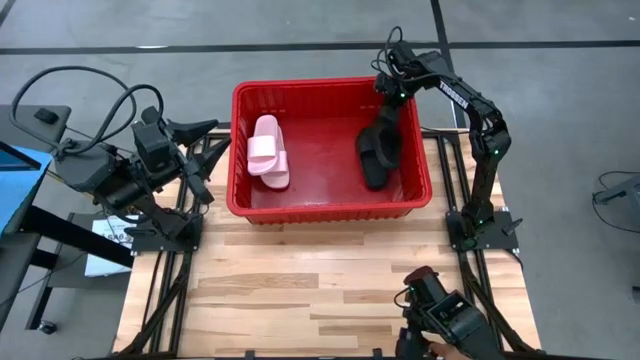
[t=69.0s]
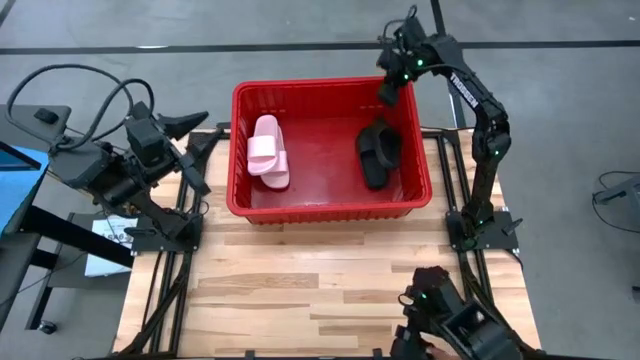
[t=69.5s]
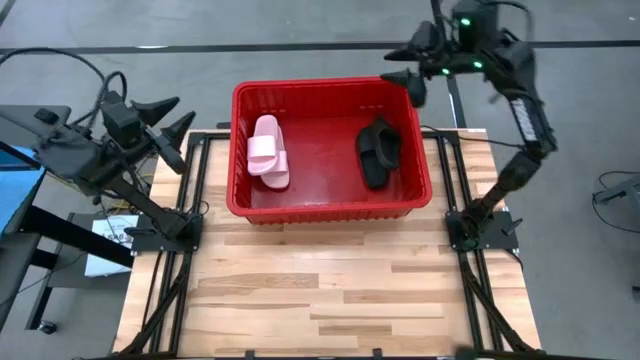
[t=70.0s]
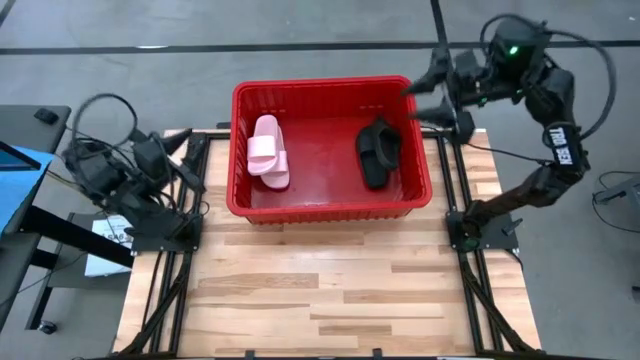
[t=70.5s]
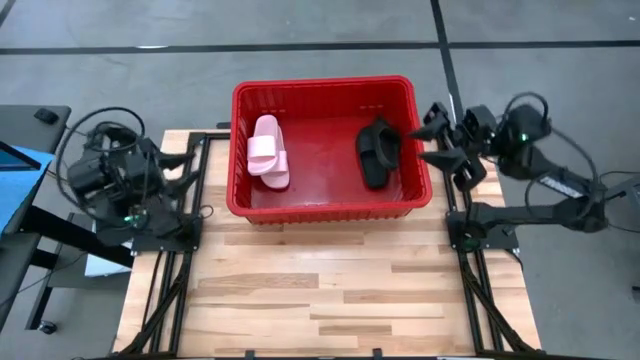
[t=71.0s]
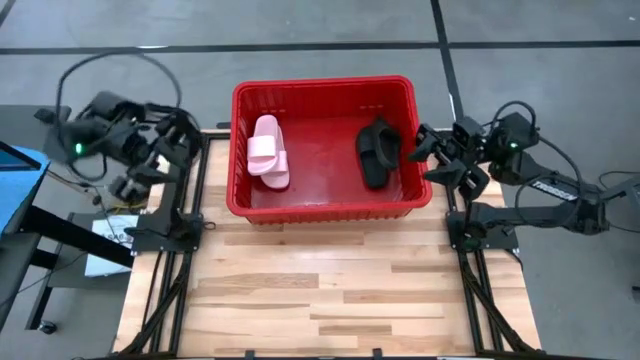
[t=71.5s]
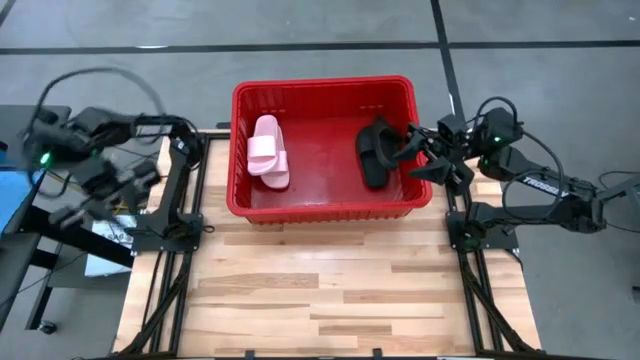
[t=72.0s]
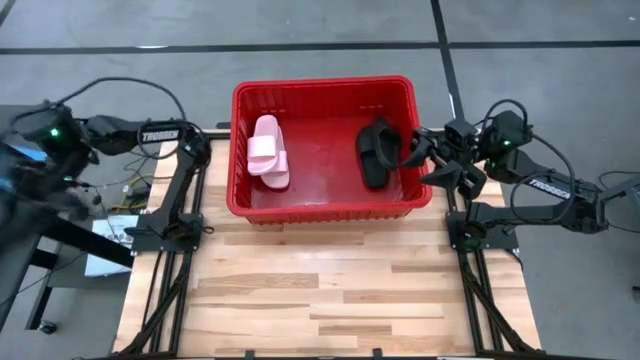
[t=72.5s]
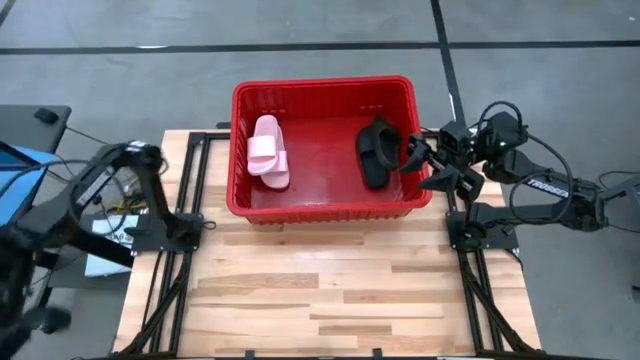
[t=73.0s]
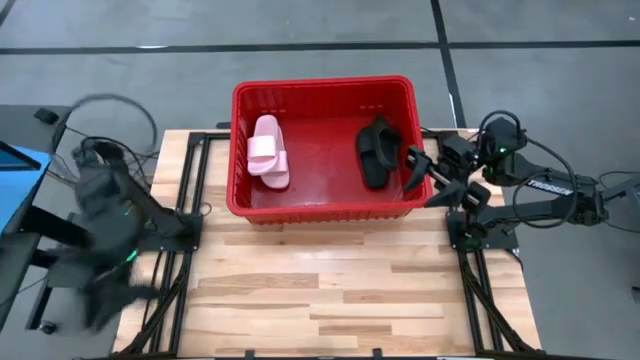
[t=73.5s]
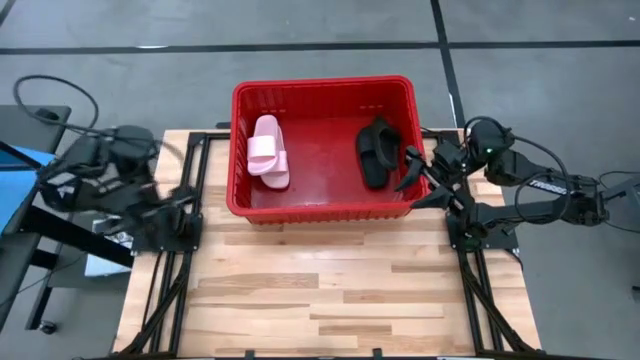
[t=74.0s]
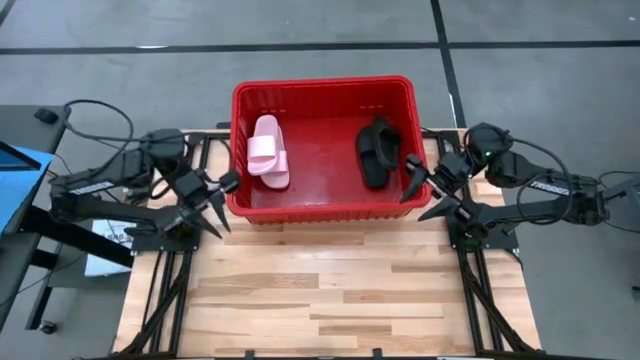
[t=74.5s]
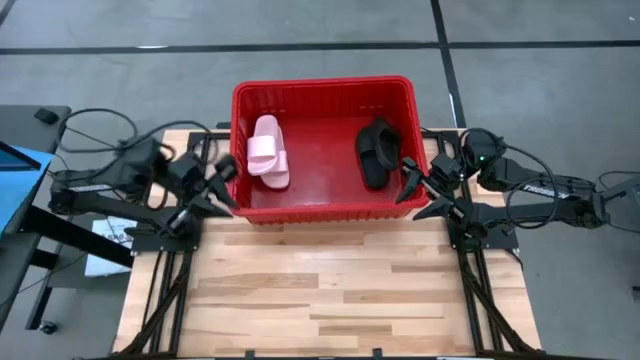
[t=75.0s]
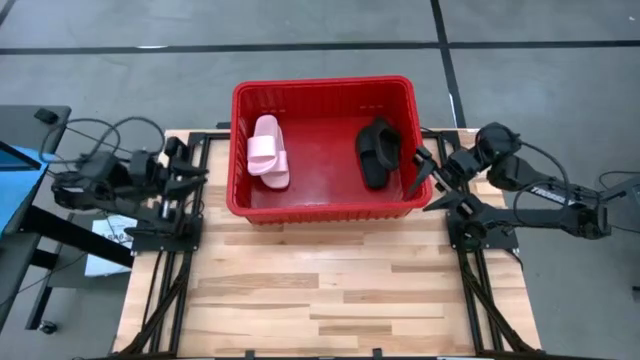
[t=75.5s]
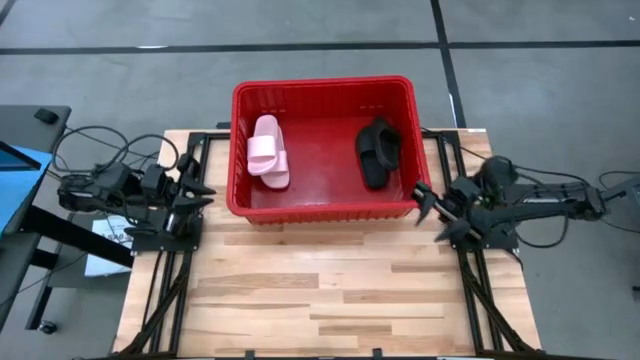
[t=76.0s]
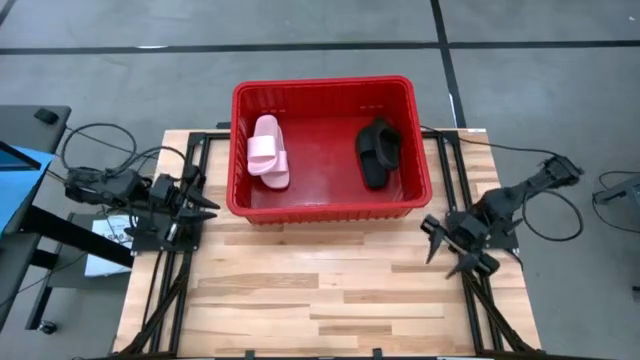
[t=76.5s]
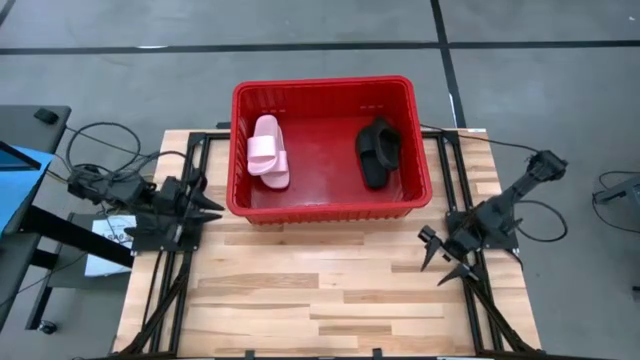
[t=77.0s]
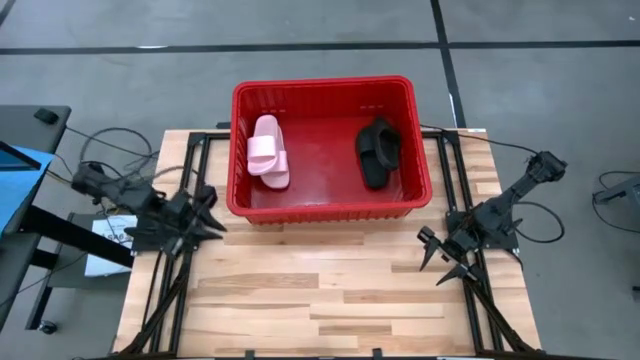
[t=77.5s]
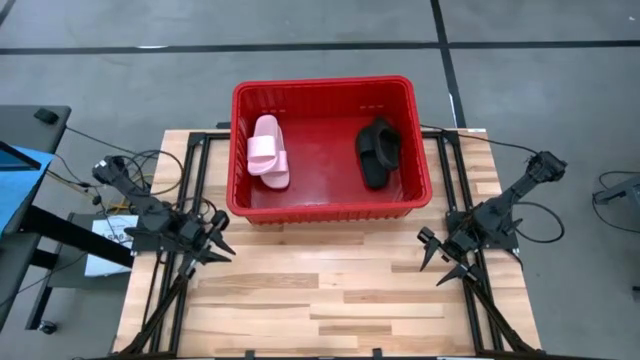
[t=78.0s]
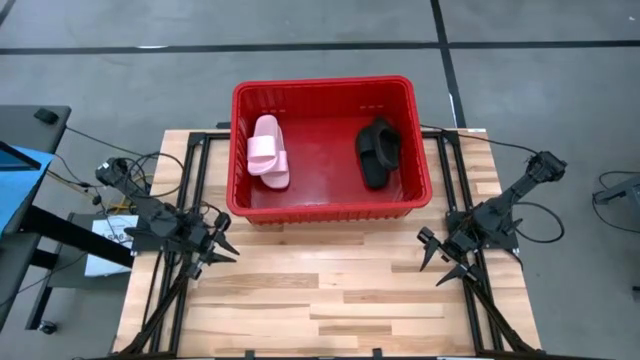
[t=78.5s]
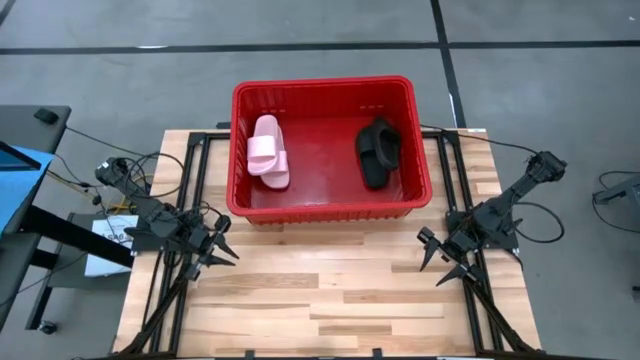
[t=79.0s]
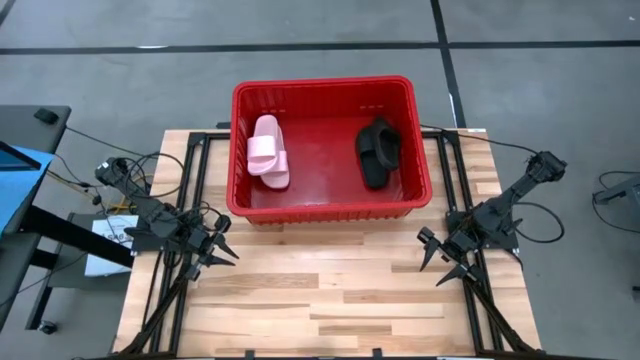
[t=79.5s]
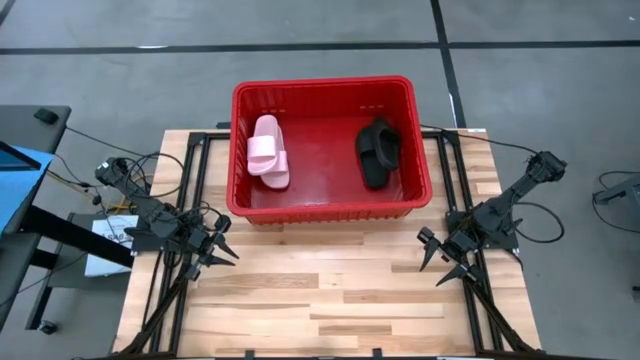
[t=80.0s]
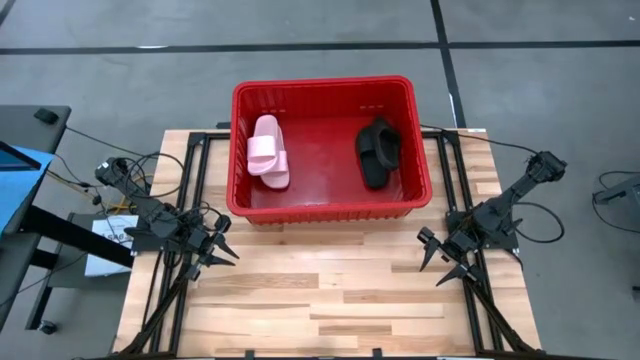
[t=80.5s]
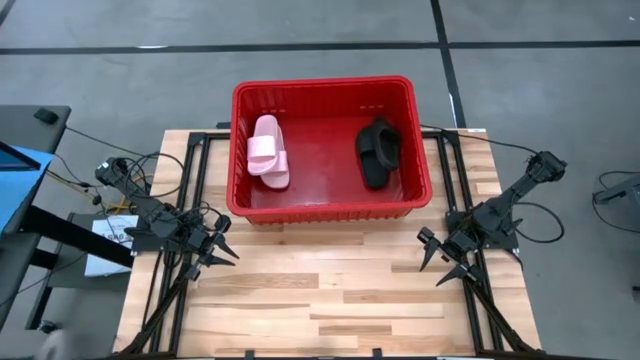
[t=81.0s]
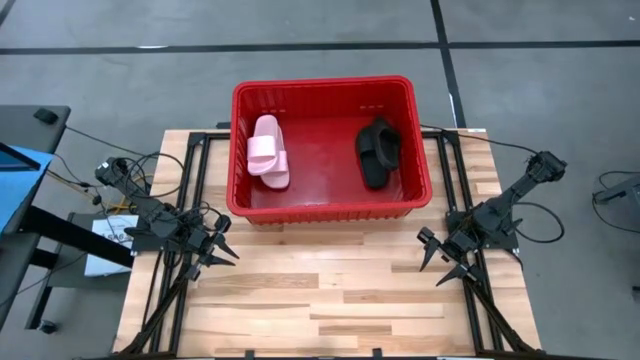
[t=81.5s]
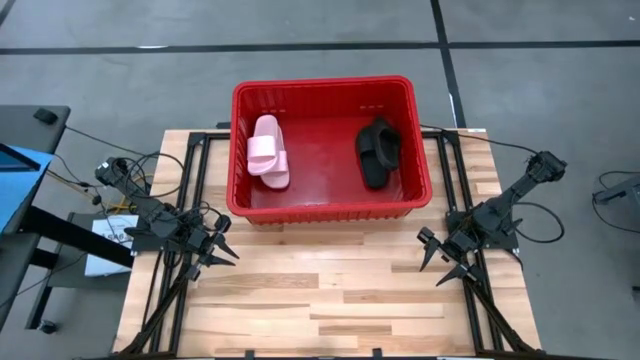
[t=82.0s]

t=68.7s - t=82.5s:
Task: Pick and place slides into bin
Return to Home Position

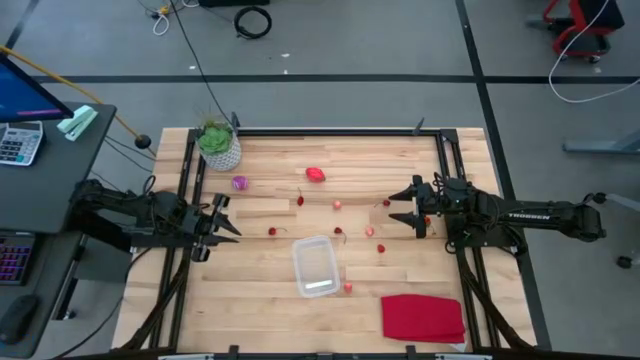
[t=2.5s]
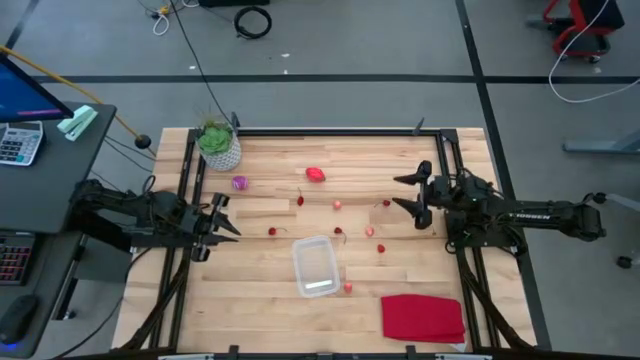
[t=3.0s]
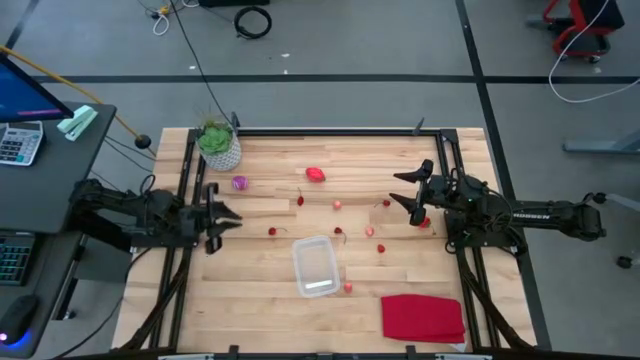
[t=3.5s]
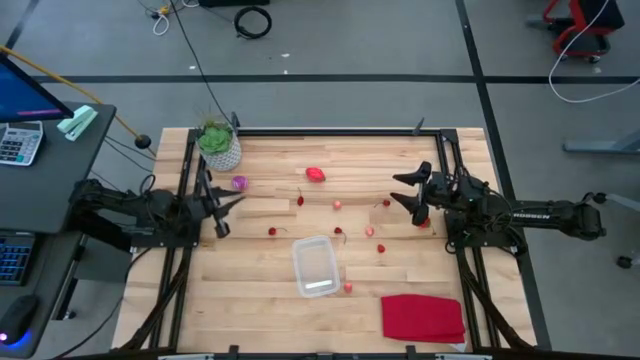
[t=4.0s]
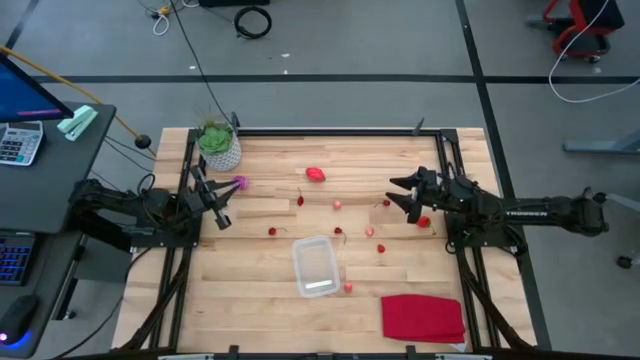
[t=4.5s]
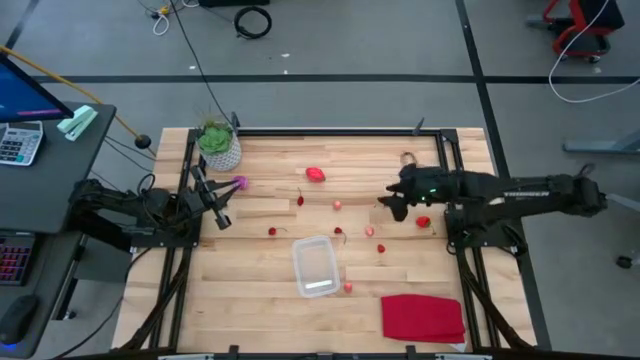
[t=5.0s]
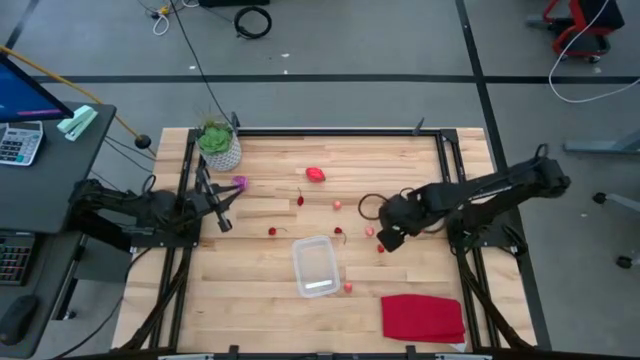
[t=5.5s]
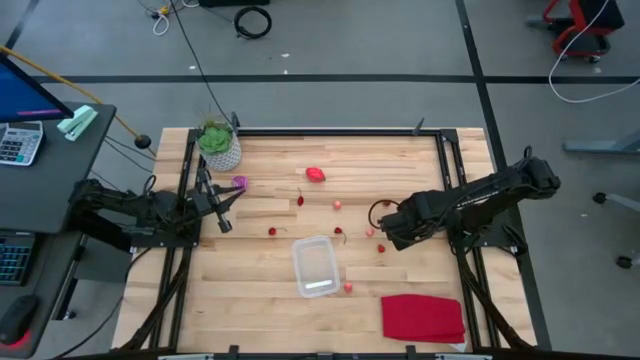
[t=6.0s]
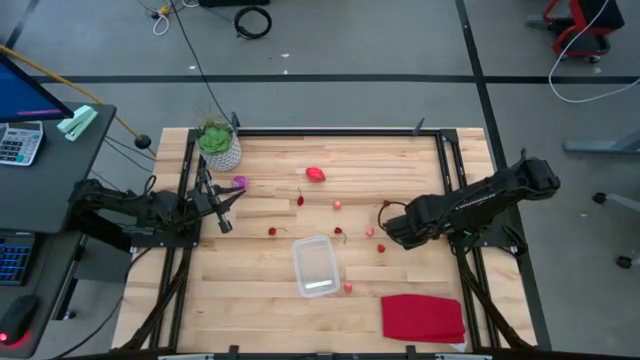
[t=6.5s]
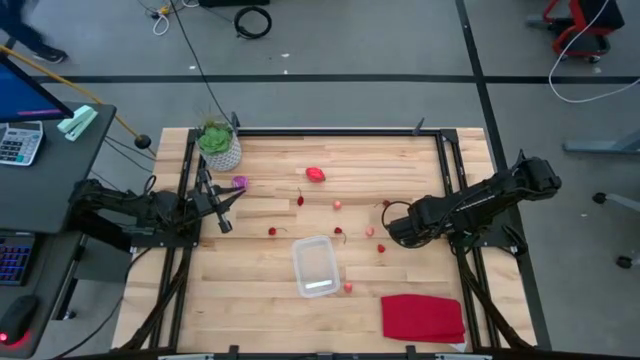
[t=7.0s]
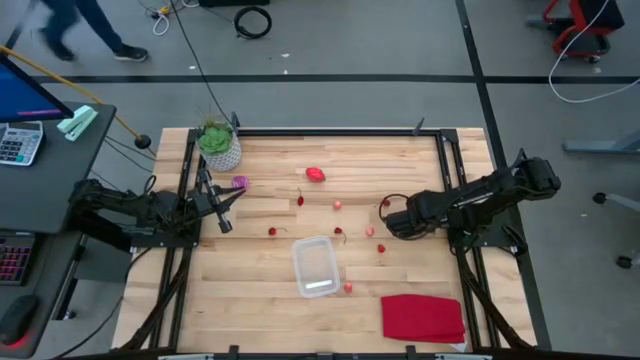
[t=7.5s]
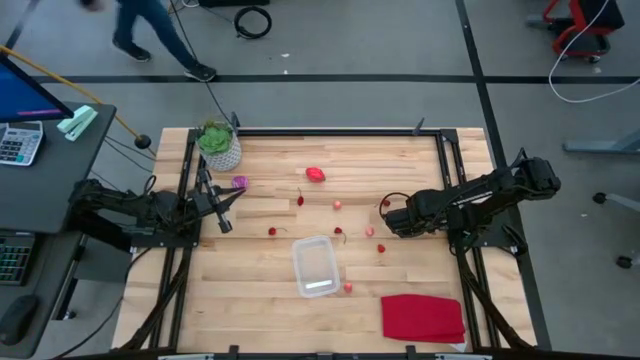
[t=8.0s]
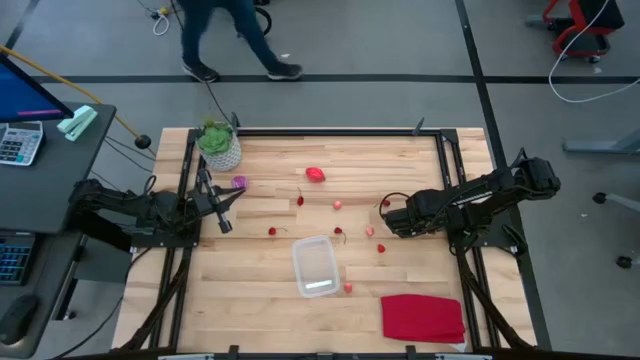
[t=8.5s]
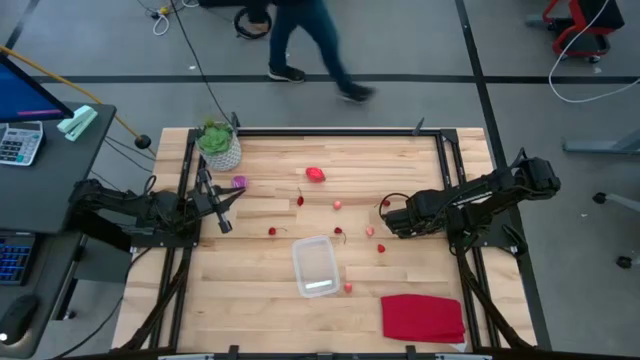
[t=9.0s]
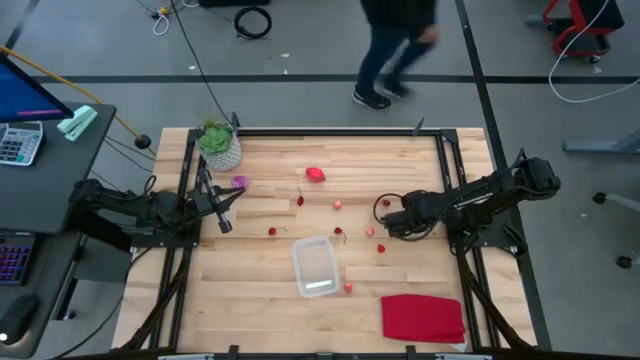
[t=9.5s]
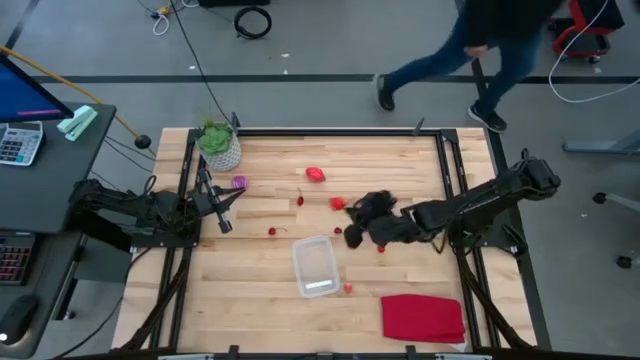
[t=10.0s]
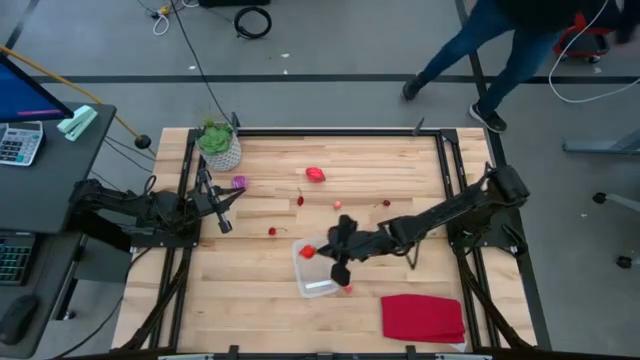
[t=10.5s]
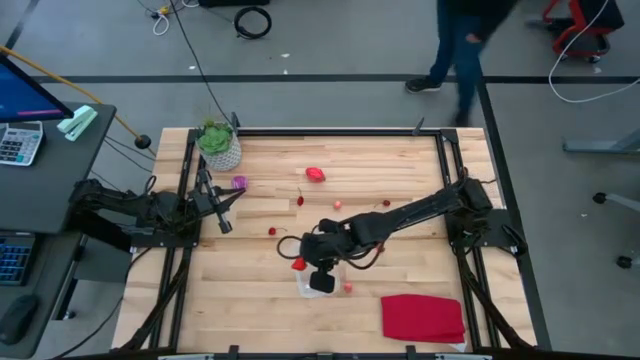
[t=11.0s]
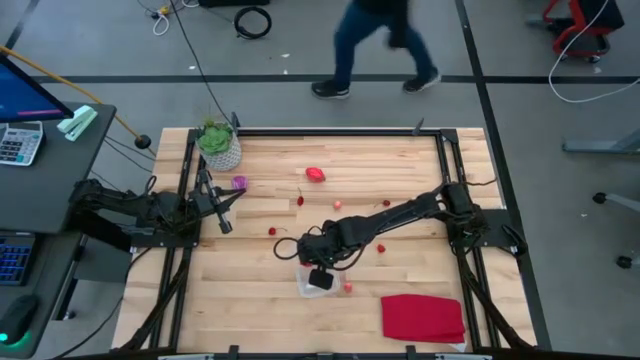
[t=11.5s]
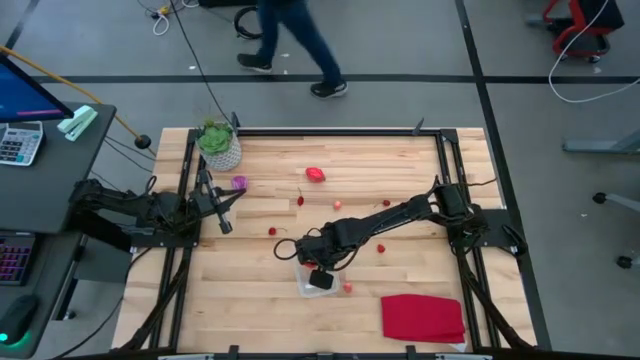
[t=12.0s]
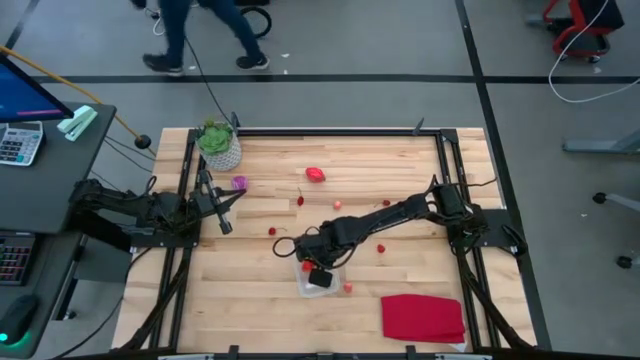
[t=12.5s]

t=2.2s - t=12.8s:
Task: Pick and placing Produce into tupperware
Put the red strawberry into the transparent bin
